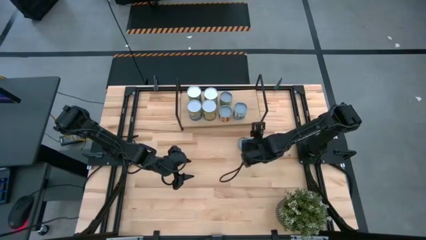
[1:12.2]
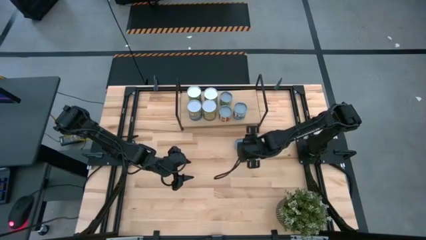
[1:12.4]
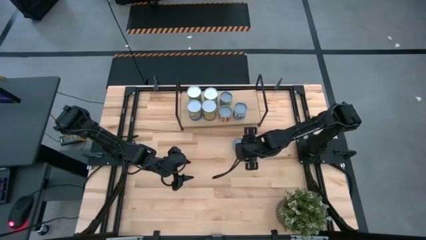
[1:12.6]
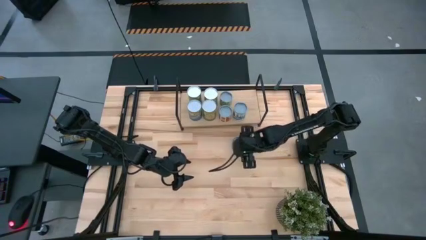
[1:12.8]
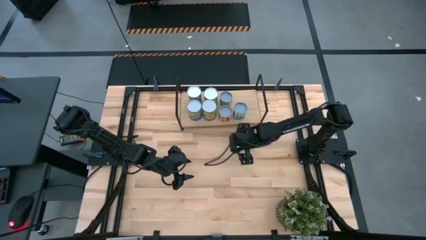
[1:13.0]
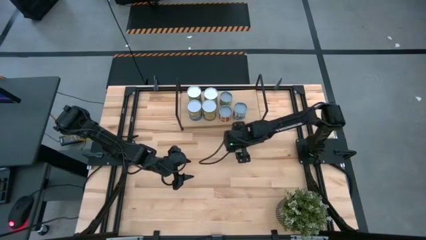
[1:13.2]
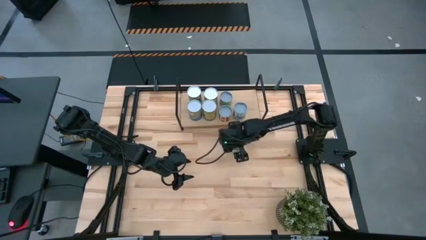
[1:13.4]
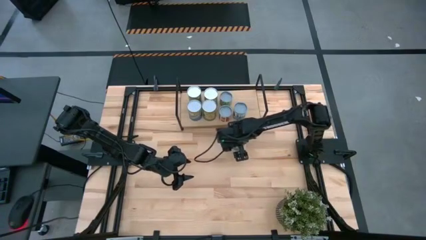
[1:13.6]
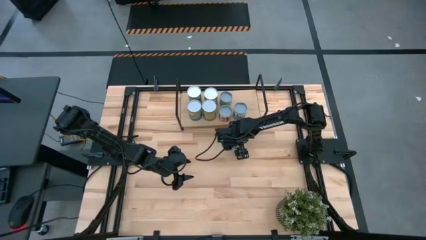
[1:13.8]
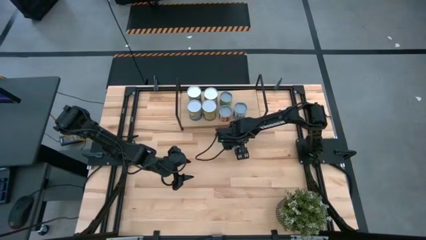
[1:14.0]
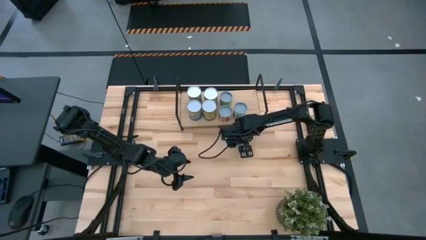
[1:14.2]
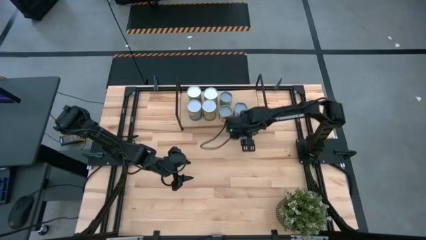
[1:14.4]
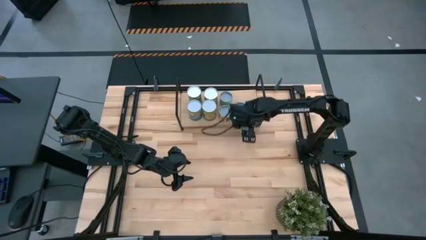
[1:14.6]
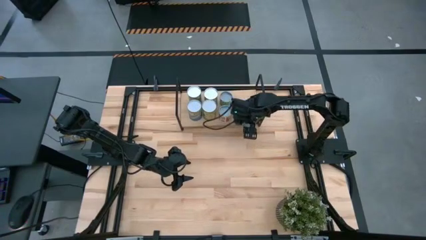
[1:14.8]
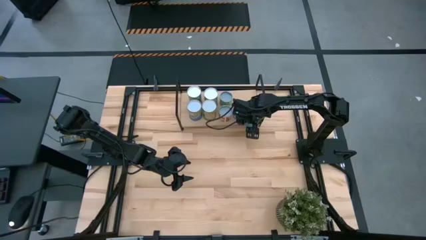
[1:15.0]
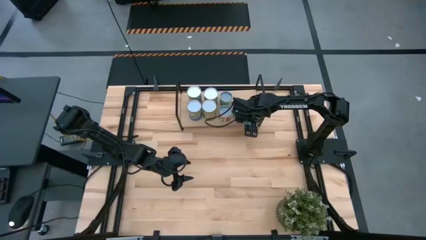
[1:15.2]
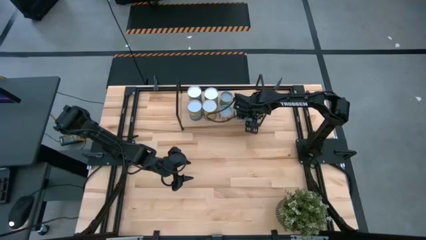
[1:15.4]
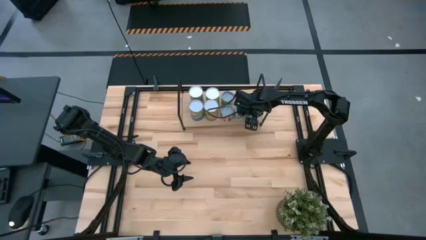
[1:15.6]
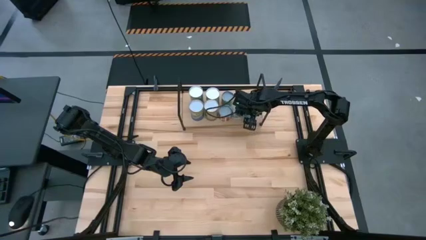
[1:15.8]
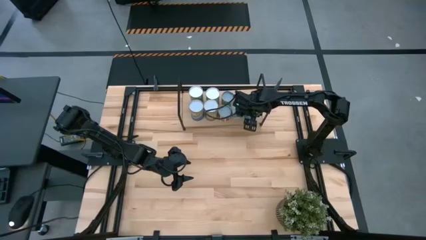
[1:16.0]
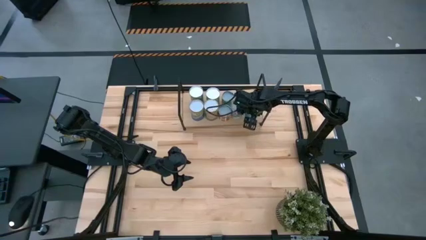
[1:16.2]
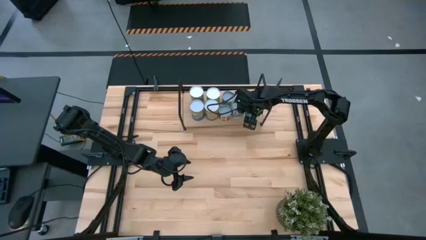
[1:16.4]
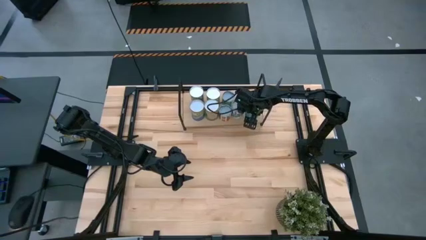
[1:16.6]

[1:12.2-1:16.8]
Task: Pick and place cans onto a shelf
Put the canned green tuna on the shelf

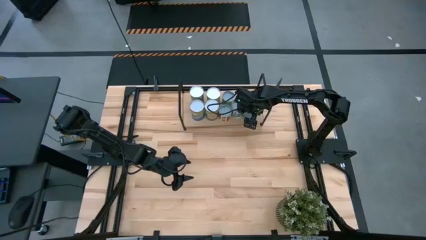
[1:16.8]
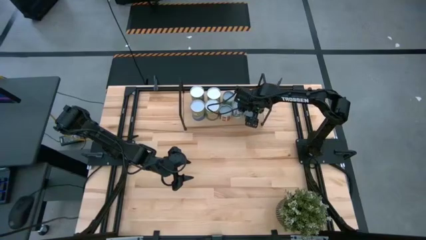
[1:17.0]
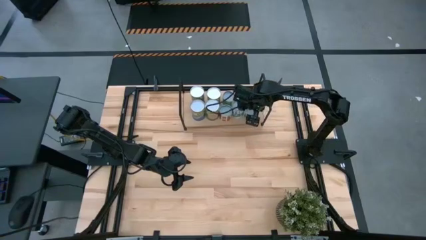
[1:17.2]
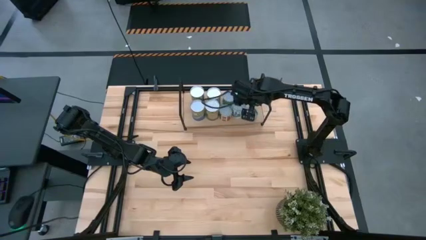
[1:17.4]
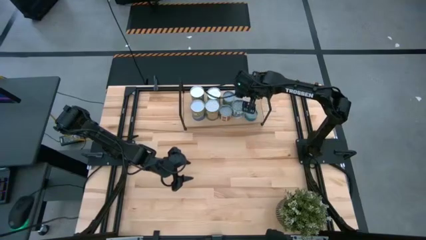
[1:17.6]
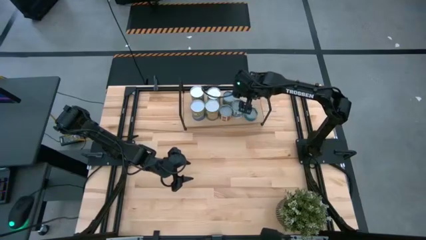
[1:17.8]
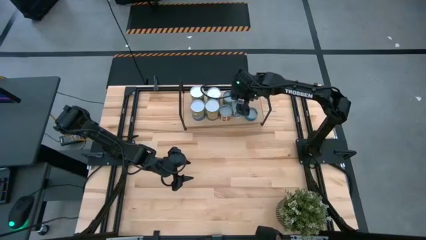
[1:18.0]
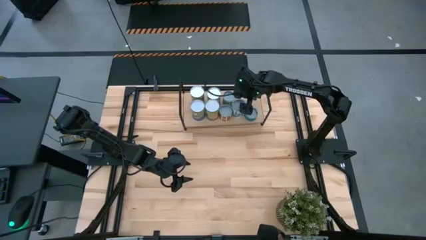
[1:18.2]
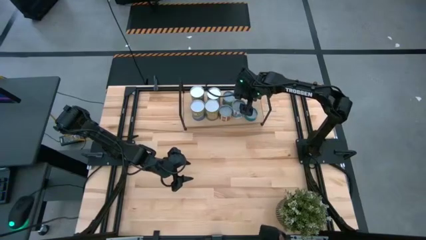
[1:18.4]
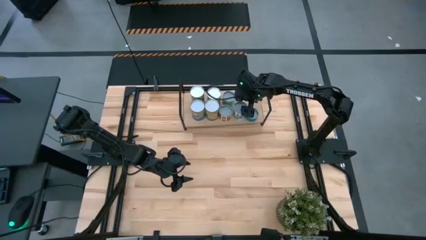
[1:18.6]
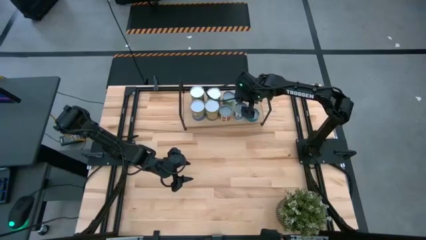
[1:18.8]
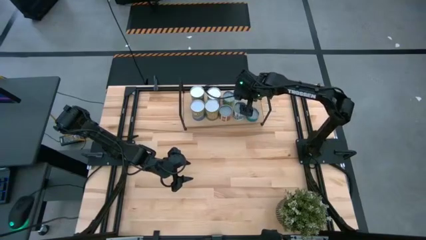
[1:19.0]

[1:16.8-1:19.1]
Adjust the mixed vegetable can on the shelf

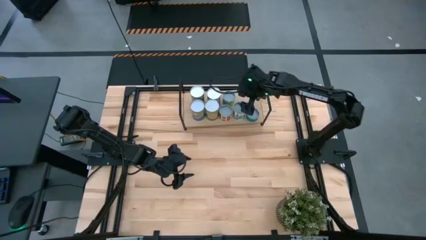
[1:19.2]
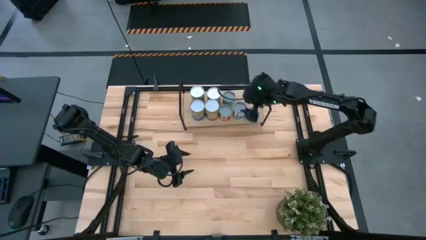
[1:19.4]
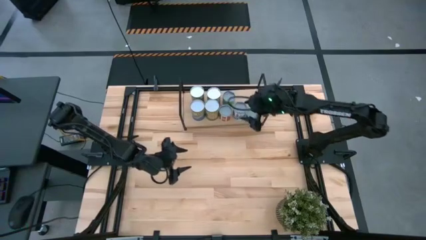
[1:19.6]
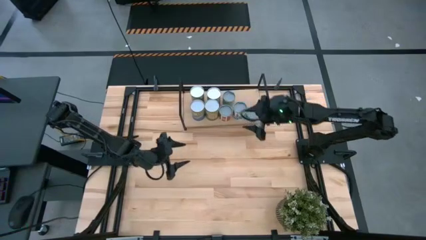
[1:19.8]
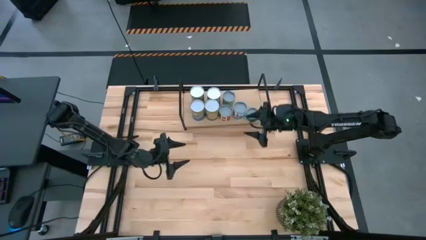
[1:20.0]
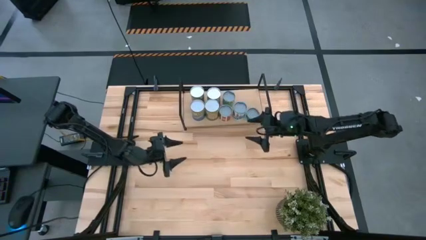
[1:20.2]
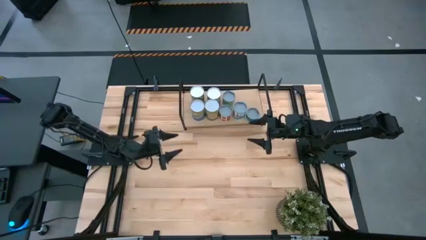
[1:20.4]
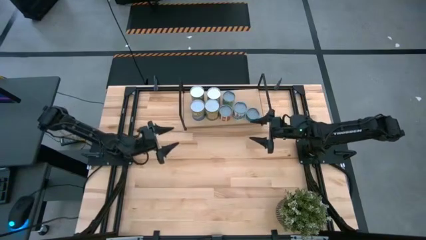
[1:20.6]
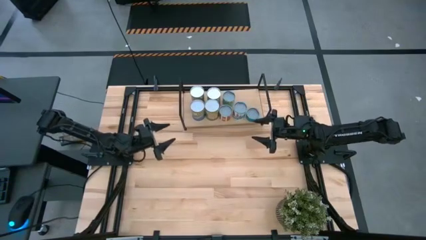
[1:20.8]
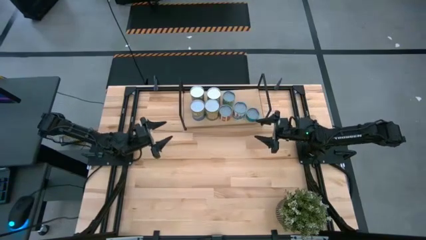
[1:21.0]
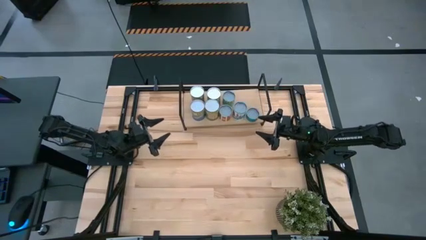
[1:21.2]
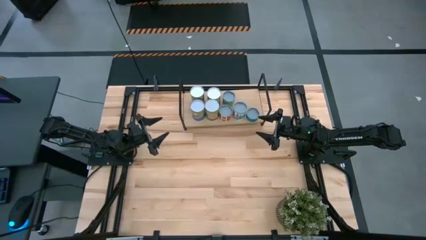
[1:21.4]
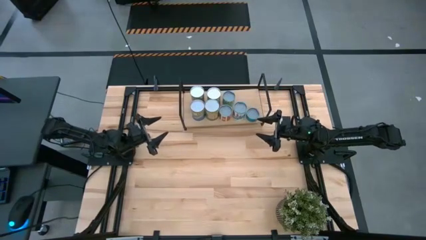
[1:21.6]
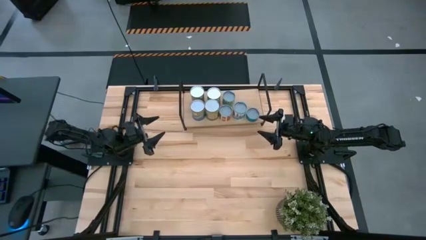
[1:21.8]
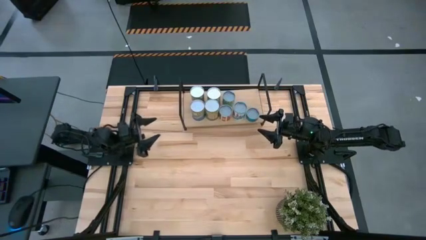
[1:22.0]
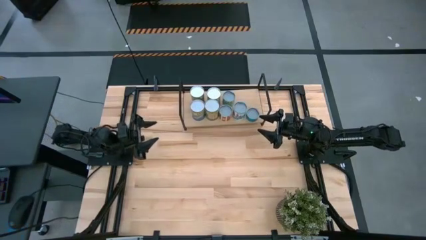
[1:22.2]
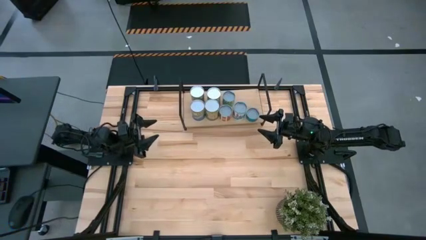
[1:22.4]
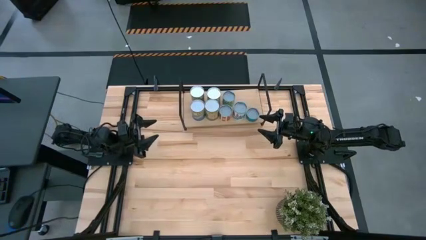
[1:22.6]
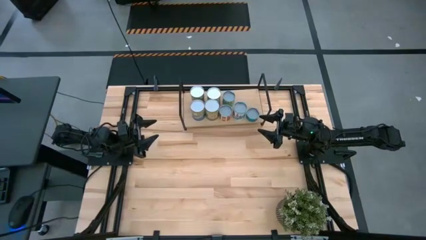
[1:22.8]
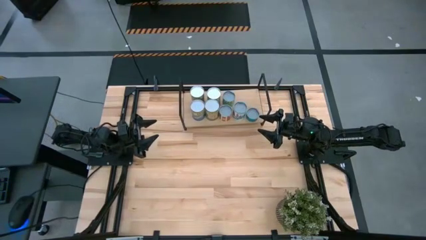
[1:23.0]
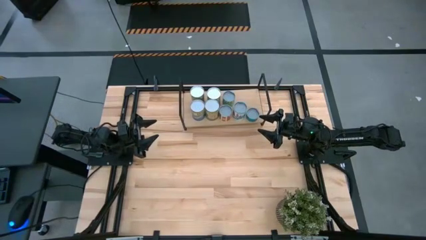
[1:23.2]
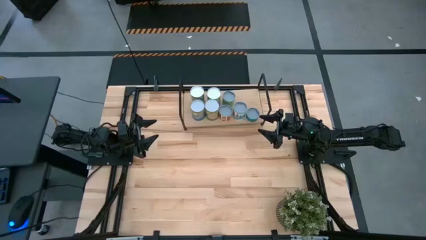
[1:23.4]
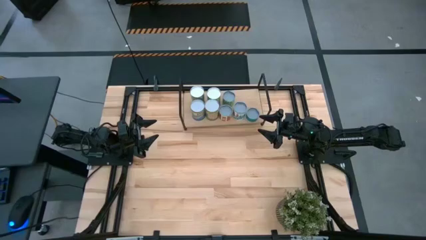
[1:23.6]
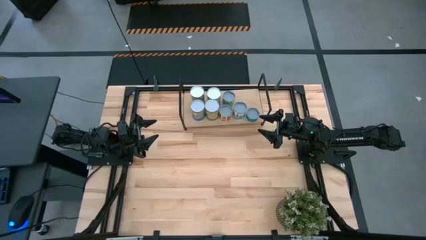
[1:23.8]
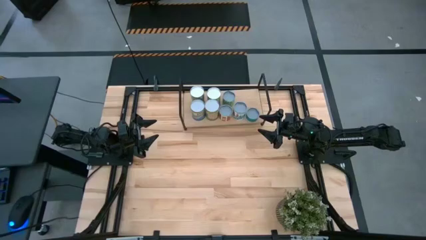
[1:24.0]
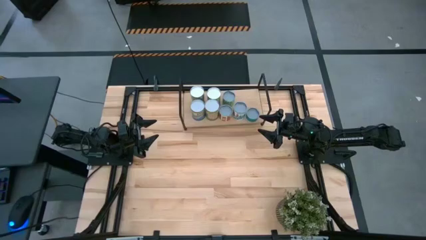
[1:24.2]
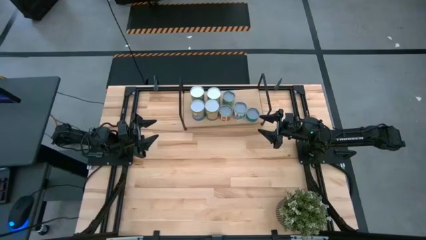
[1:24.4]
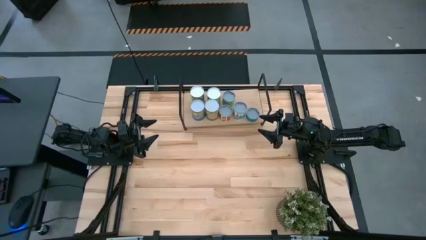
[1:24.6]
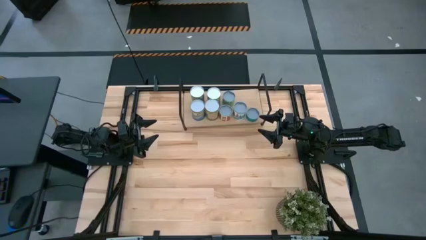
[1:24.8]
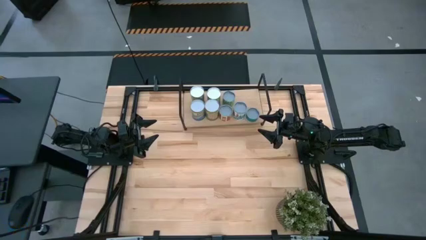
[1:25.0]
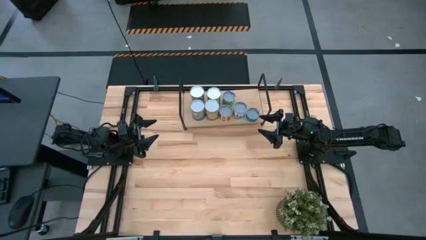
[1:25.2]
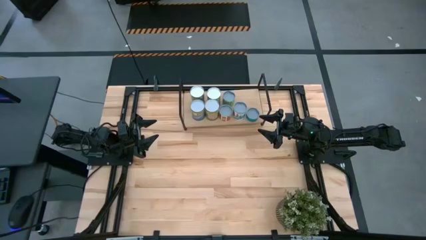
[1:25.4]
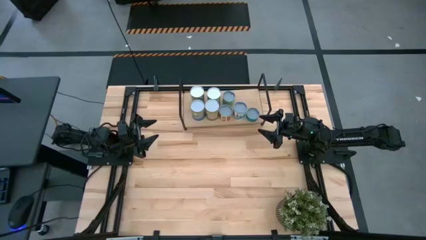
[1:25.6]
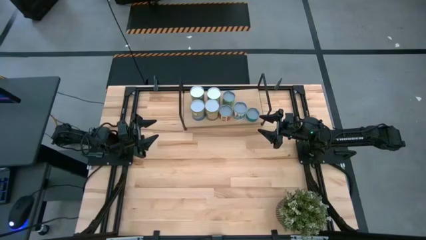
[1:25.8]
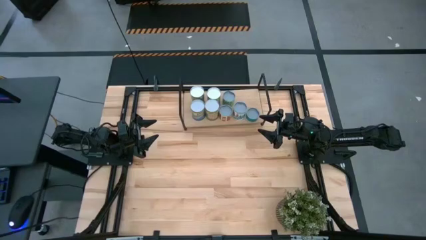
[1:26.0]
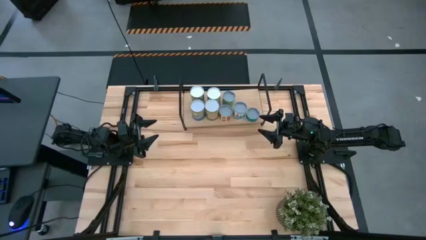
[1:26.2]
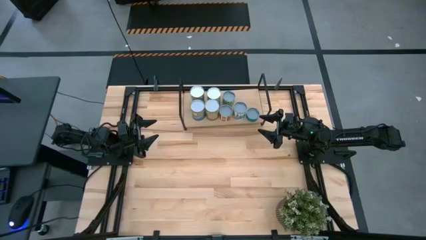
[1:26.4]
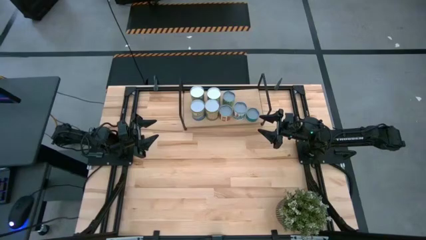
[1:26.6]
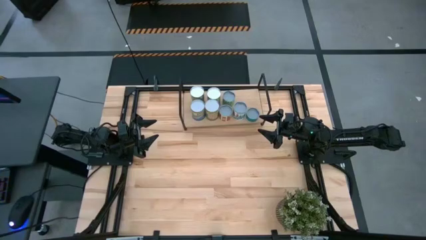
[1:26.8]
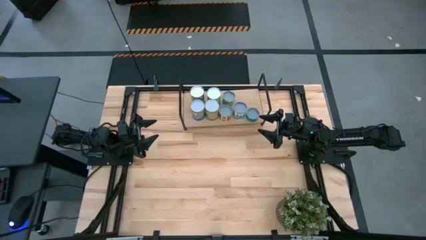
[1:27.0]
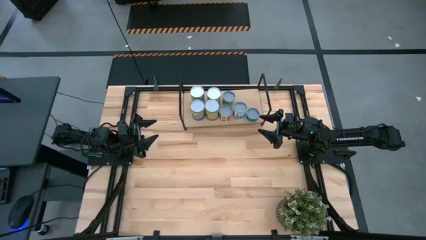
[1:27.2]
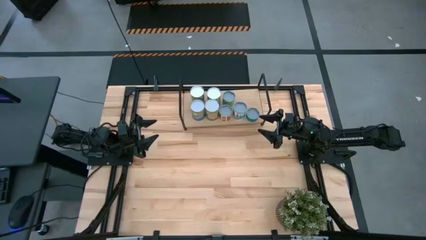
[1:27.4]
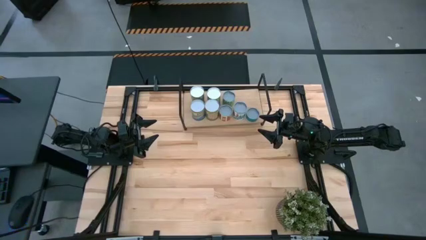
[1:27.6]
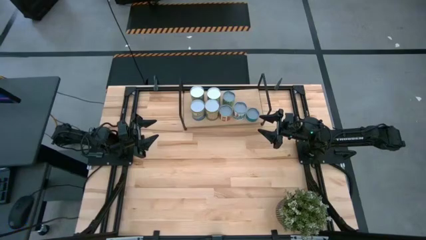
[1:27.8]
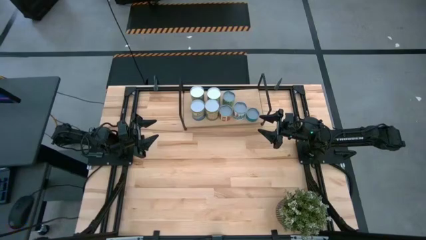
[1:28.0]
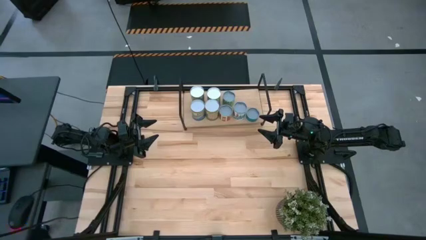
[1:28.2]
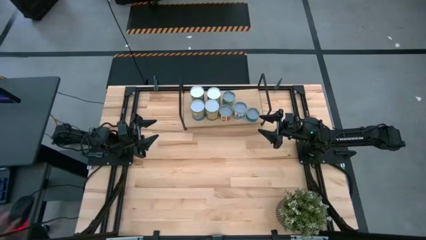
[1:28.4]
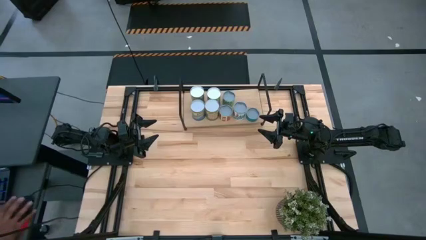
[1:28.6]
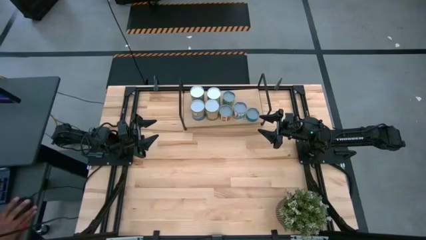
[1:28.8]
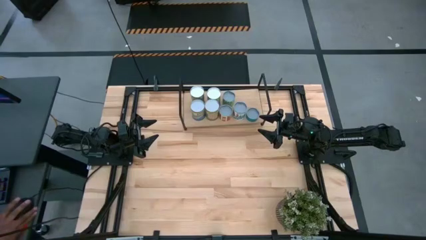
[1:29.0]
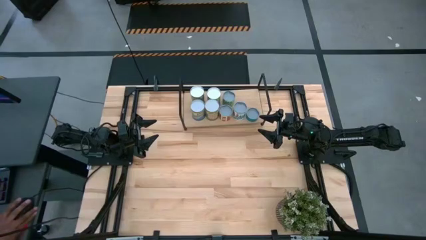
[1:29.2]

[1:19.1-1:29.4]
Return to Home Position
